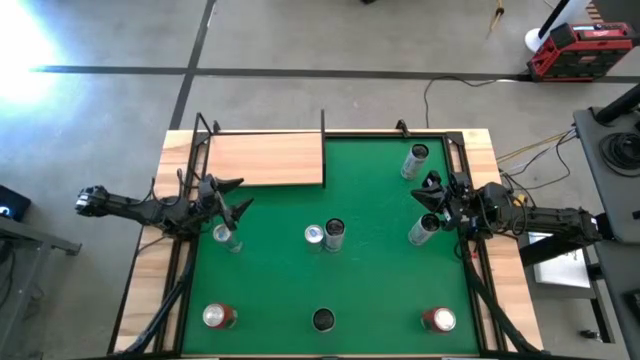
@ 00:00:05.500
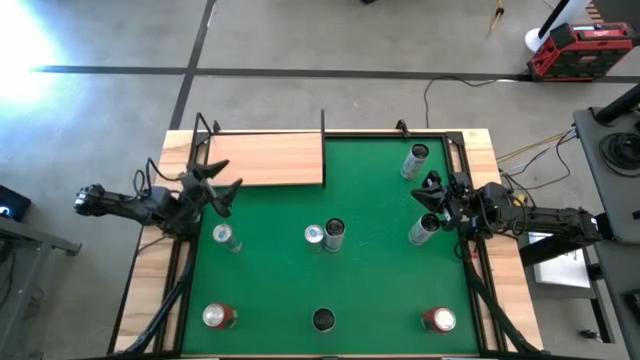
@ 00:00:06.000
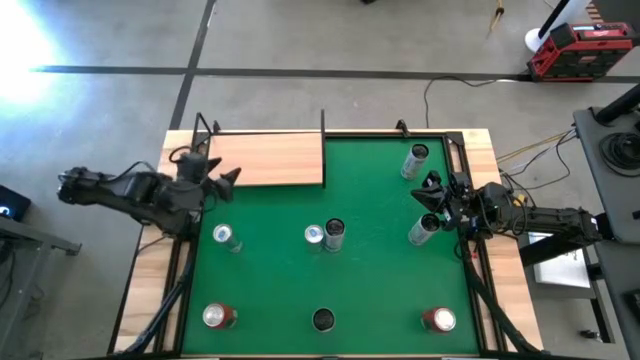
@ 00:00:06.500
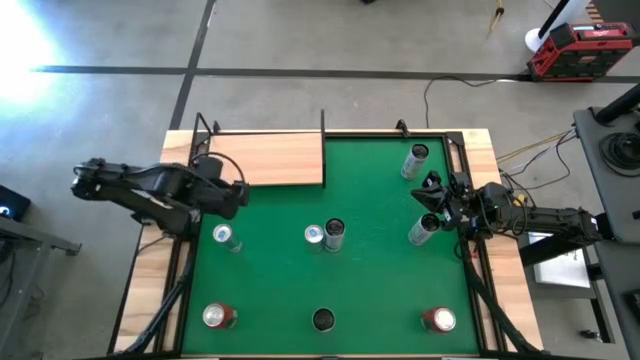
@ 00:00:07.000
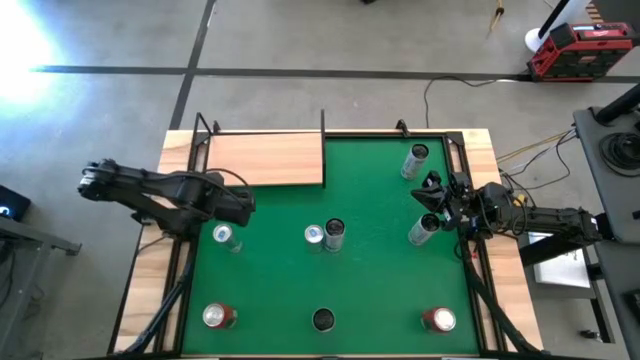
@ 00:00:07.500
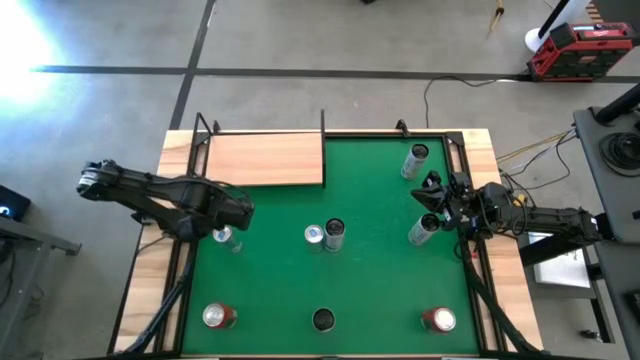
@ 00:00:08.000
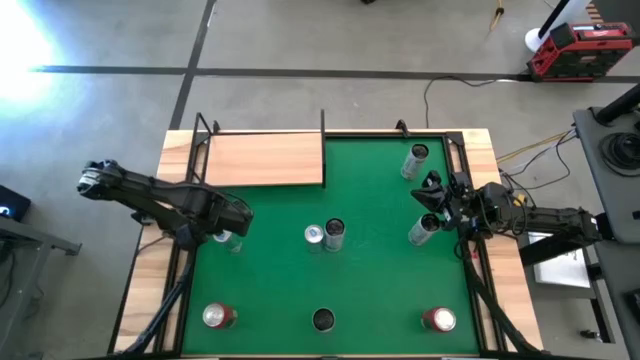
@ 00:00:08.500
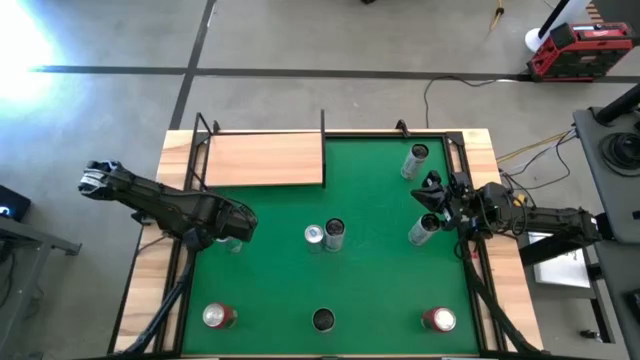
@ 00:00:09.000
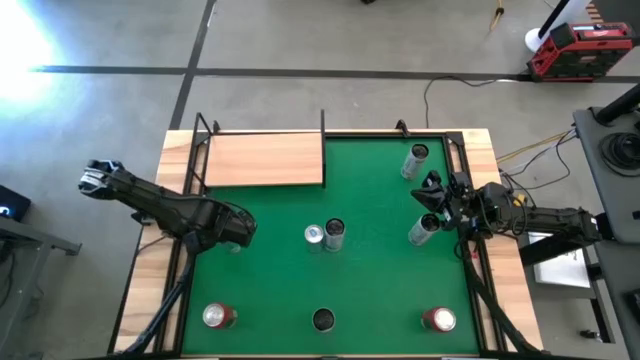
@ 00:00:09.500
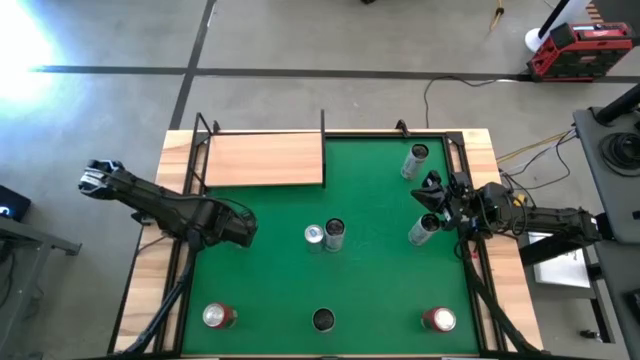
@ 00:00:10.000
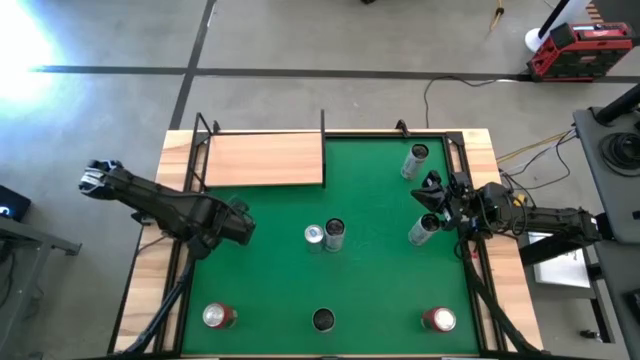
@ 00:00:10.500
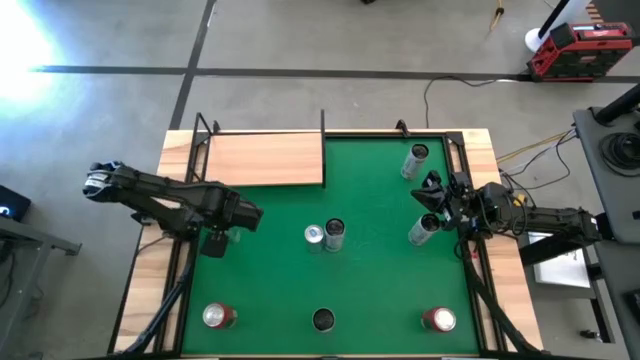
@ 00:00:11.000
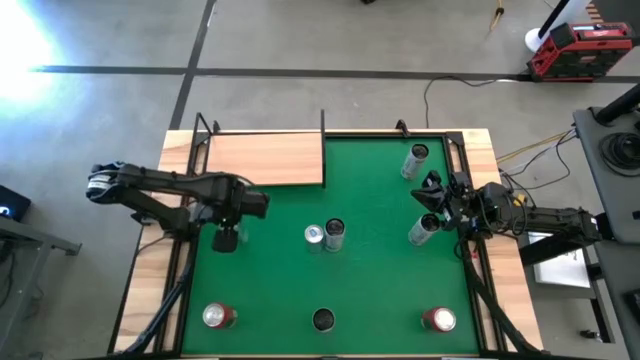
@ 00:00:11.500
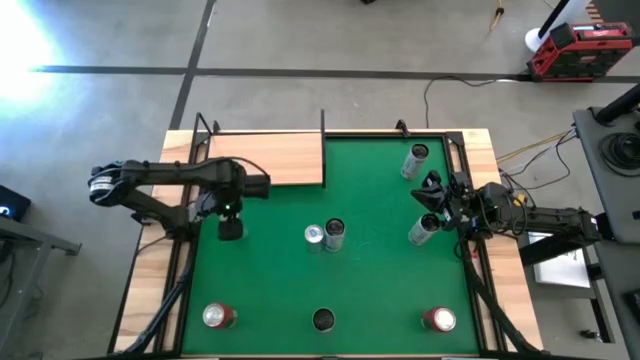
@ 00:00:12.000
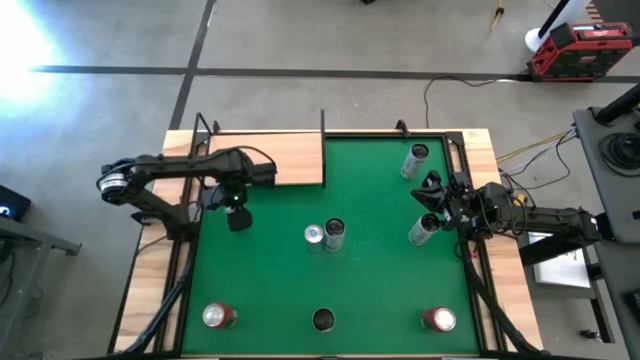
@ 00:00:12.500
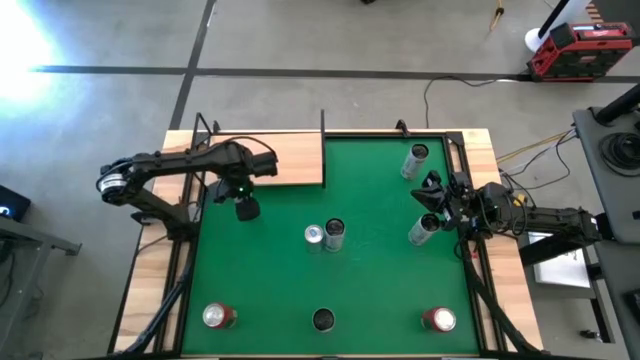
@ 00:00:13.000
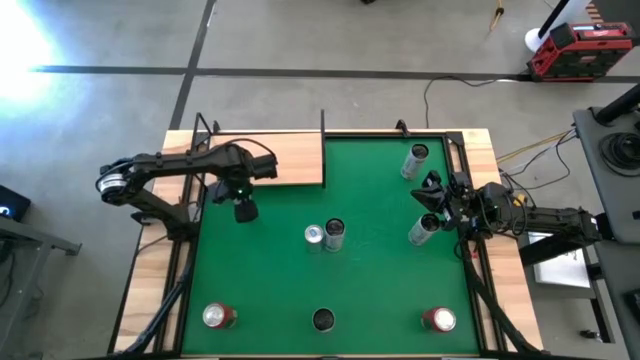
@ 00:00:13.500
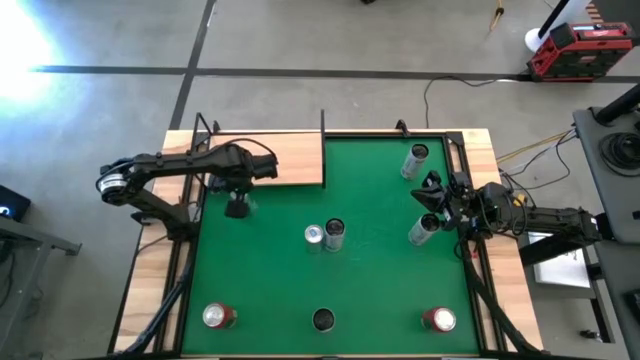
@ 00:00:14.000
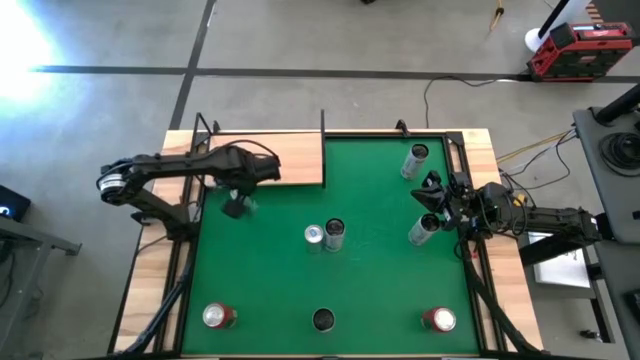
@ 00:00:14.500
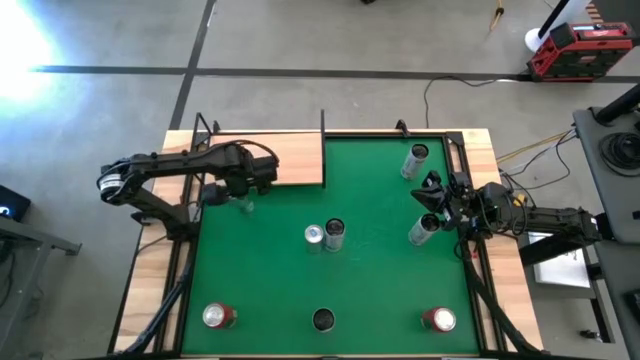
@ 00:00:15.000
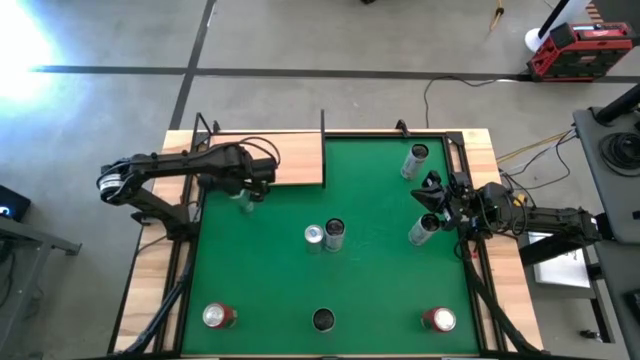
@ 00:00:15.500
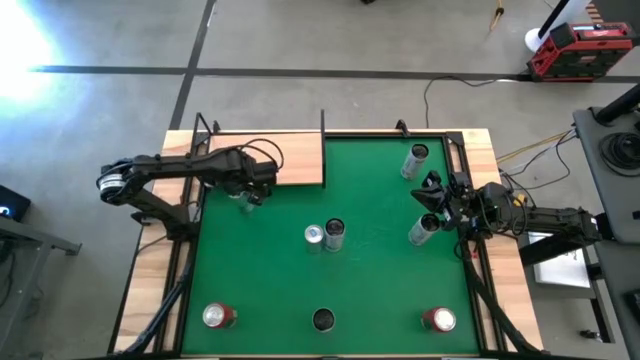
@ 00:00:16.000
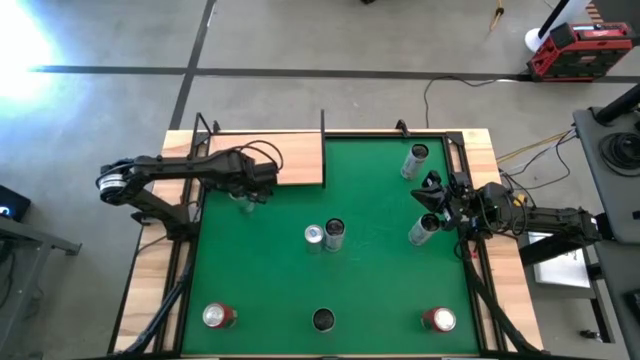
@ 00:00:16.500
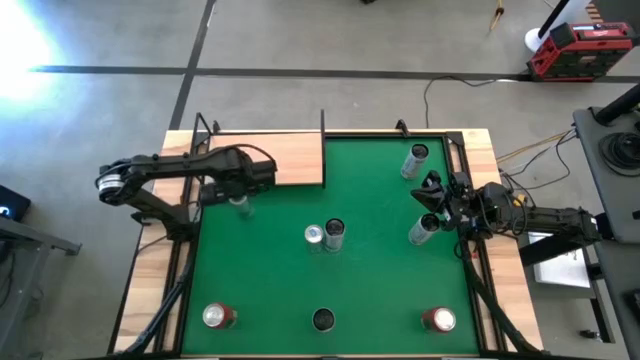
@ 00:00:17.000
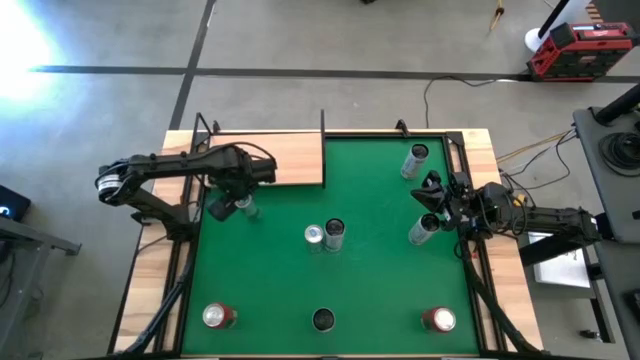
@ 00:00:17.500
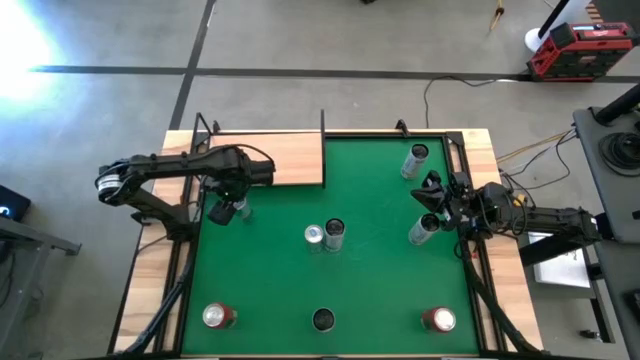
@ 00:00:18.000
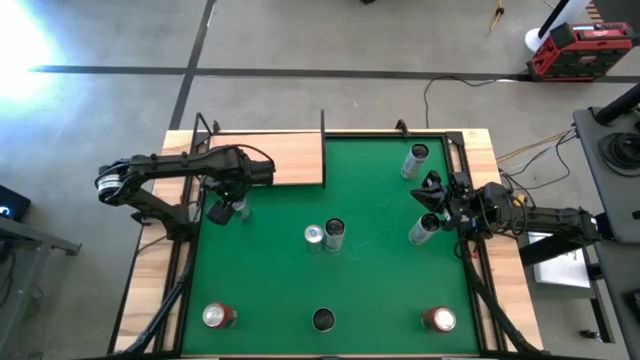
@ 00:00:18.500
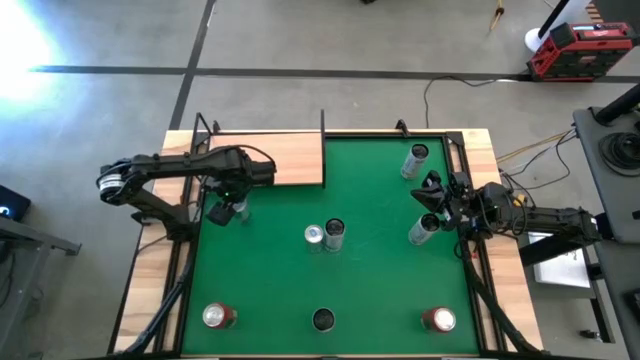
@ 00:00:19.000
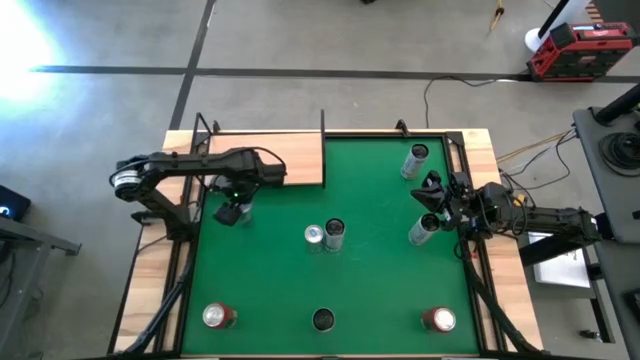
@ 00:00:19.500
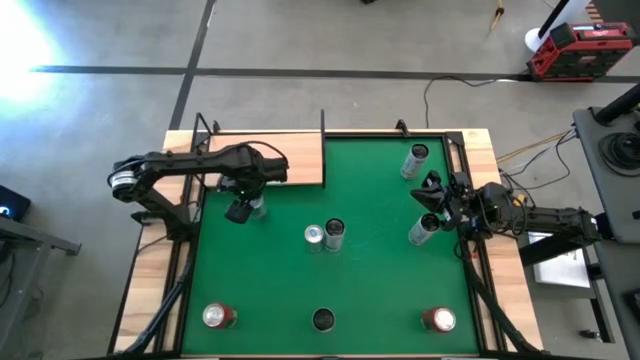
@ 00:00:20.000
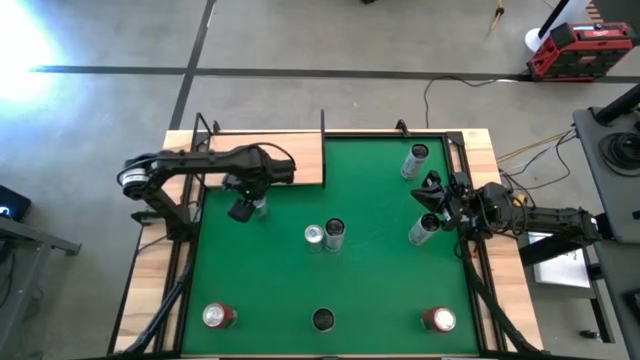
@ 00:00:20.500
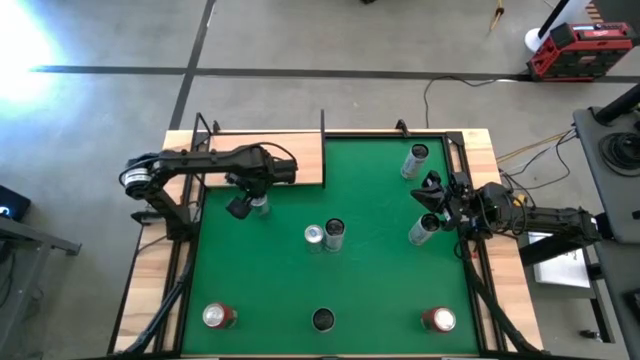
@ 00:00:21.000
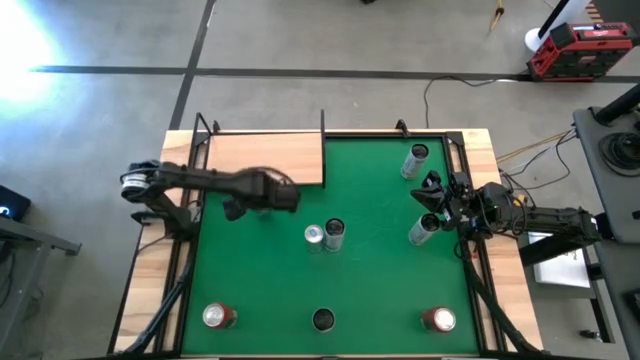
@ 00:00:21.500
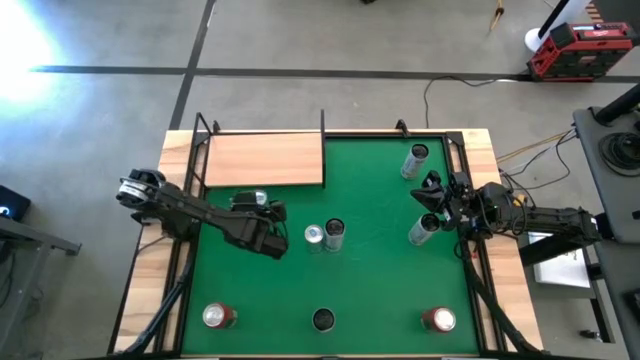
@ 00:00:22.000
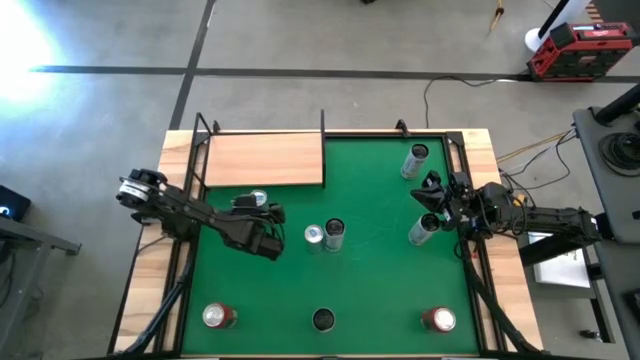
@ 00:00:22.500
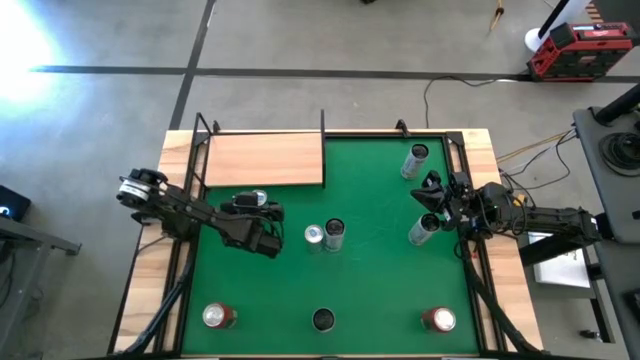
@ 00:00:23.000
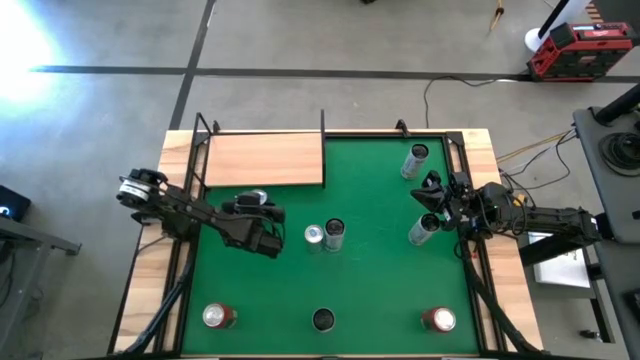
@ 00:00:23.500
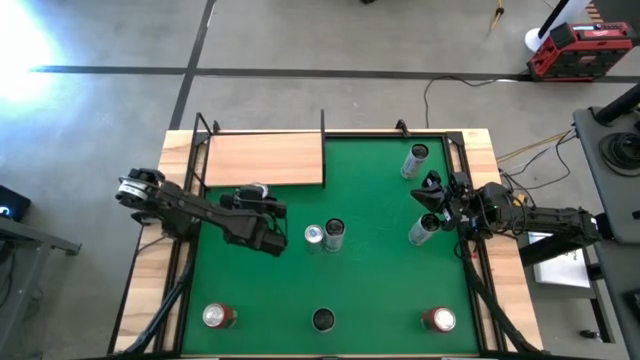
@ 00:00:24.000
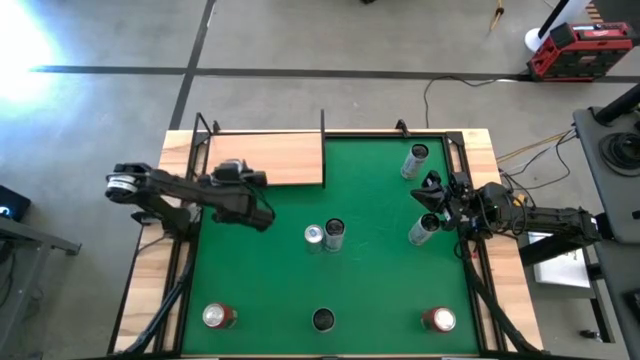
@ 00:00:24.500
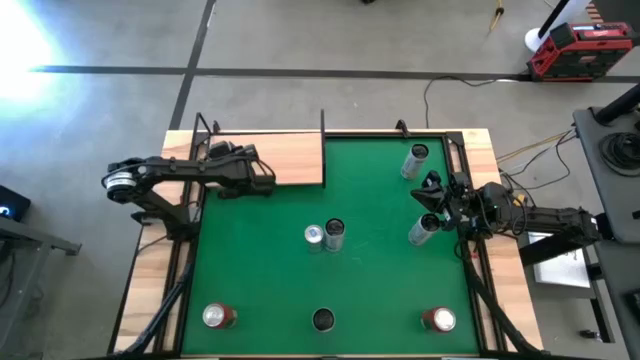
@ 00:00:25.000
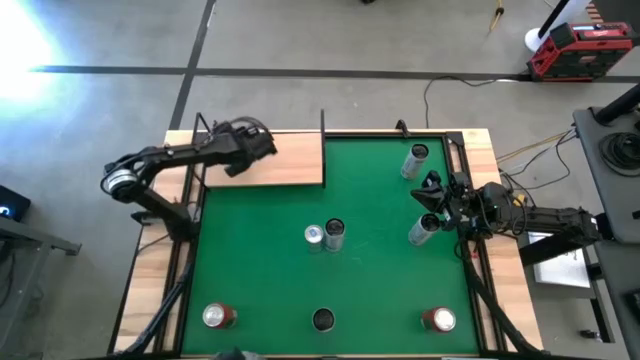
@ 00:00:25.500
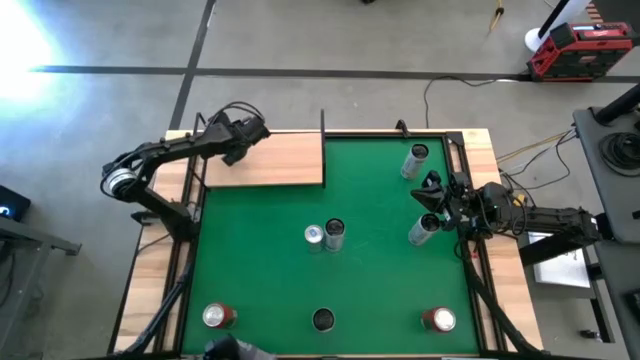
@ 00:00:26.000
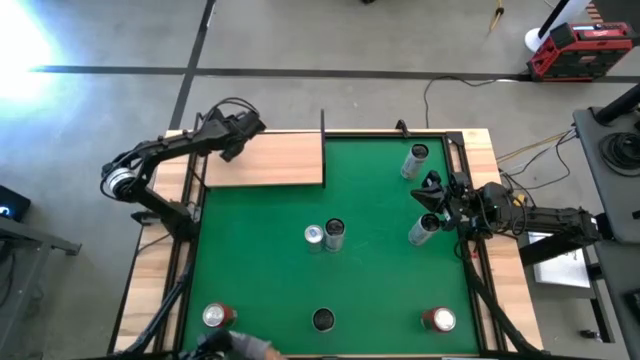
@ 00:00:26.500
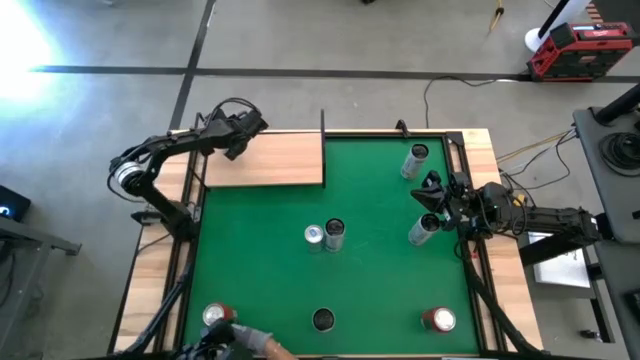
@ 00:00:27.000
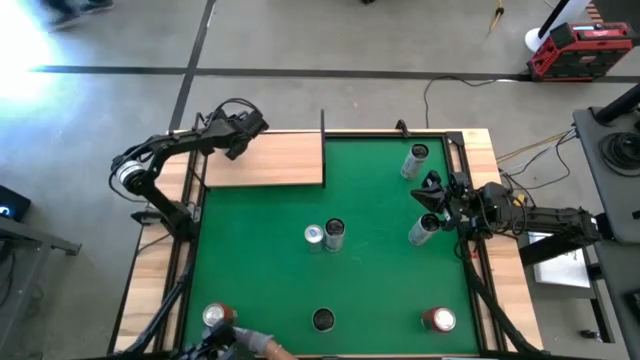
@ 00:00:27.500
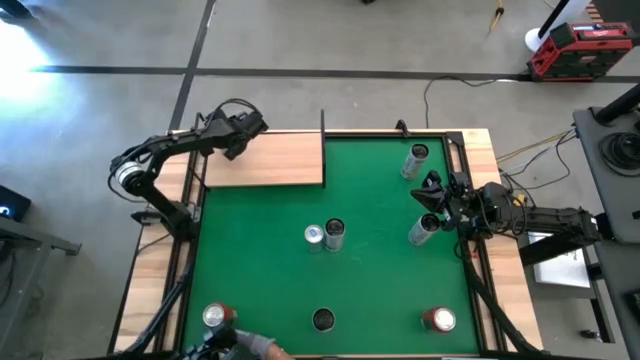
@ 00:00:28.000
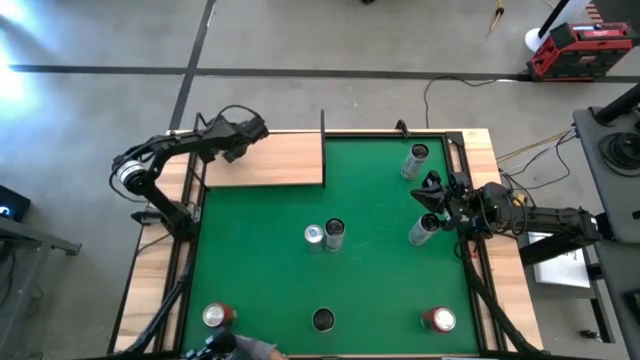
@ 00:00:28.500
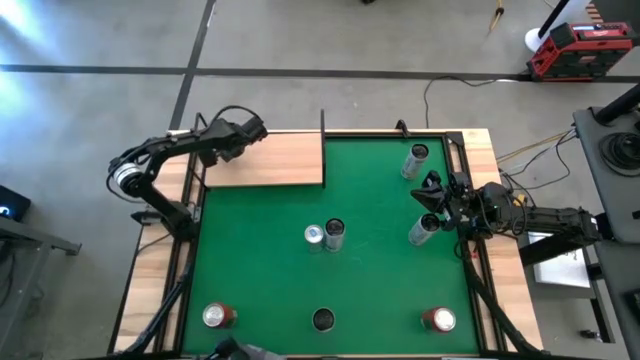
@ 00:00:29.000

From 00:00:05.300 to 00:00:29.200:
Task: Place canned beverage on shelf
Put the left blue soda can on the shelf
